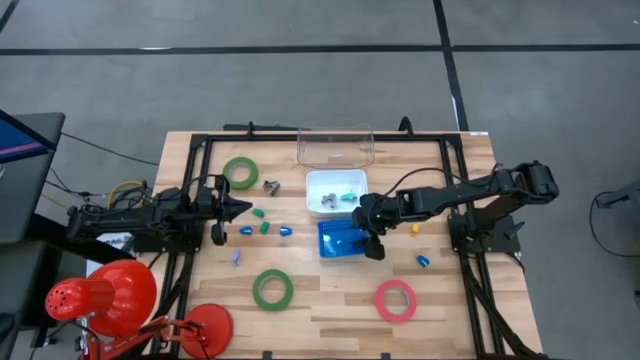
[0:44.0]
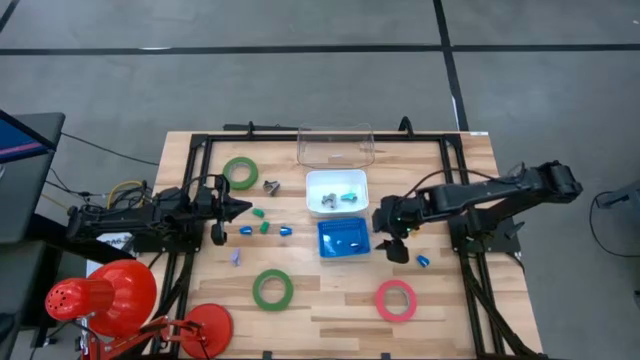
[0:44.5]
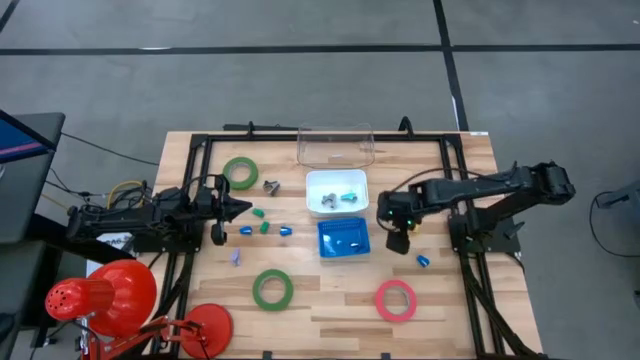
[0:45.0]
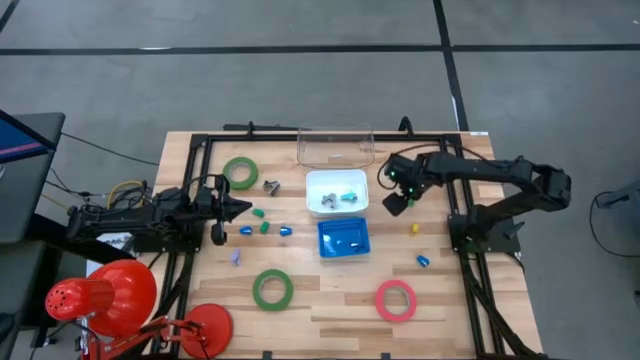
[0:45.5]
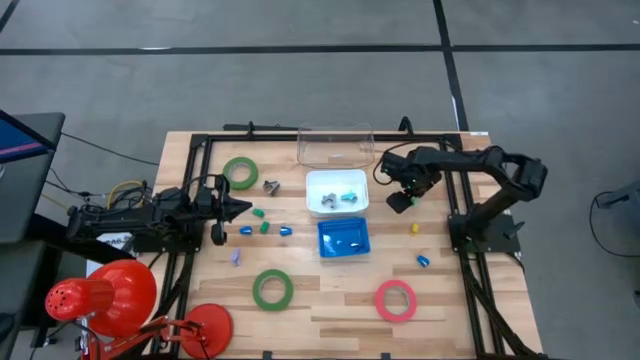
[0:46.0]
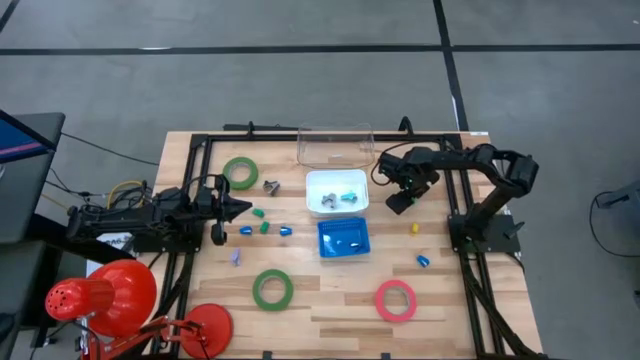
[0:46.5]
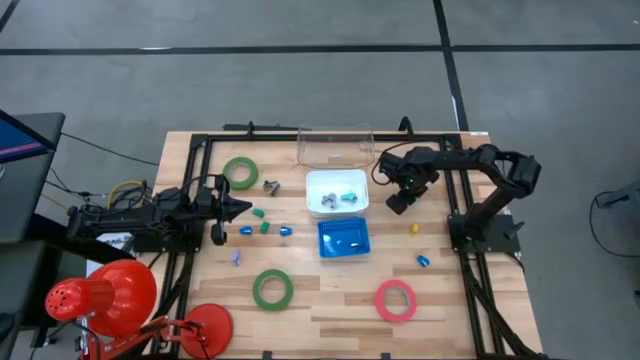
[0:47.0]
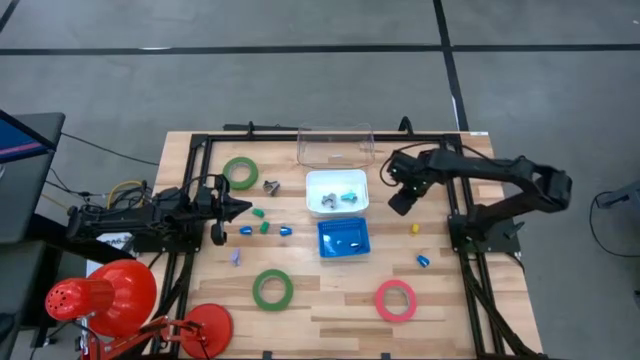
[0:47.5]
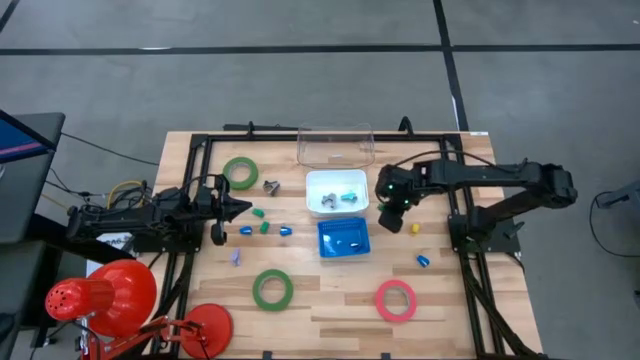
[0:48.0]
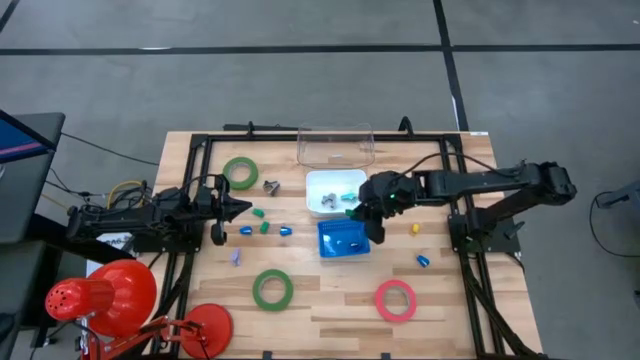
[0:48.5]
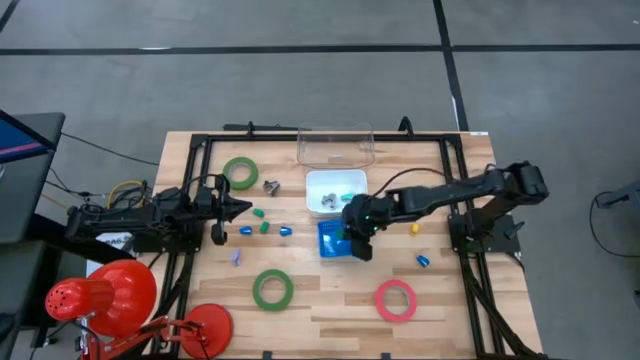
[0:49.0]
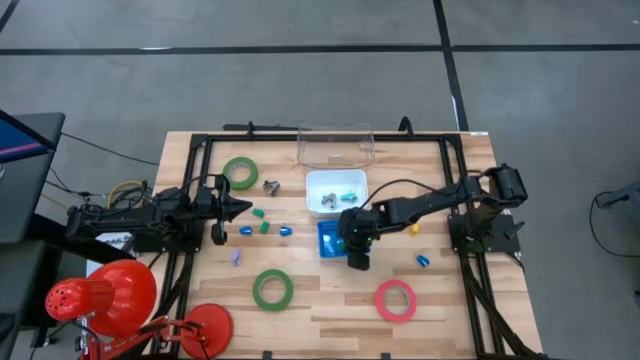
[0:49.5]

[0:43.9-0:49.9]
Task: Pick and place Stapler, Stapler remover, tape
Put the right green stapler into the blue bin

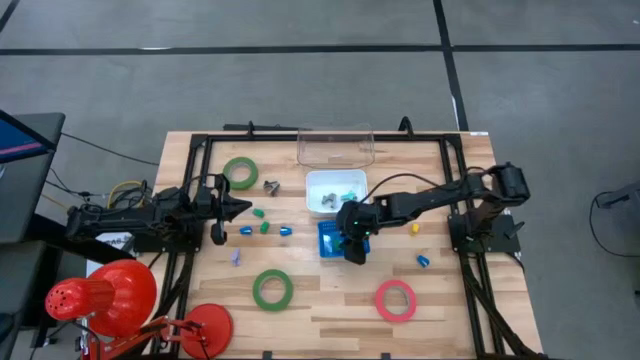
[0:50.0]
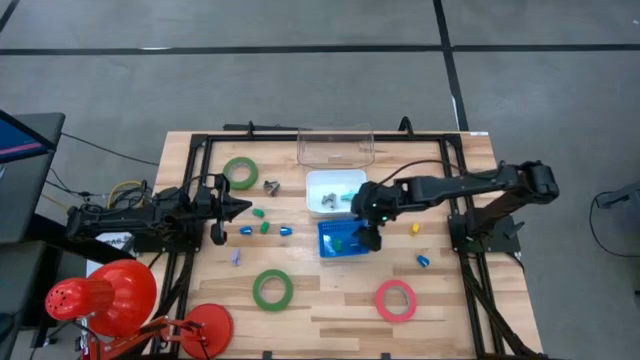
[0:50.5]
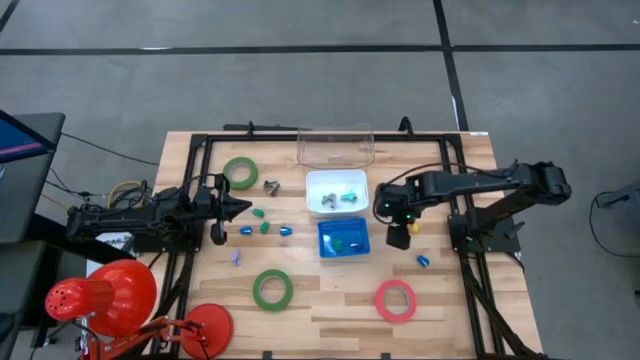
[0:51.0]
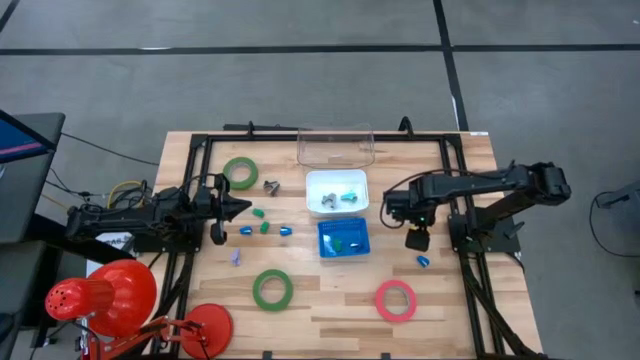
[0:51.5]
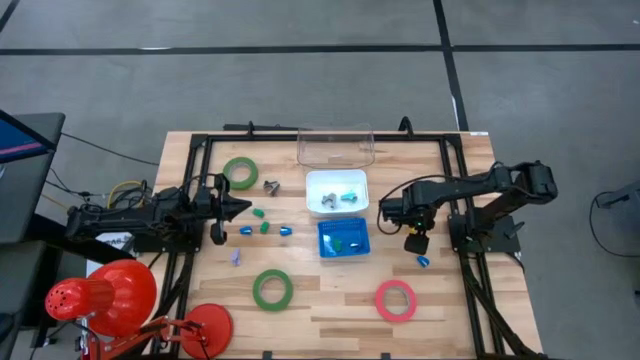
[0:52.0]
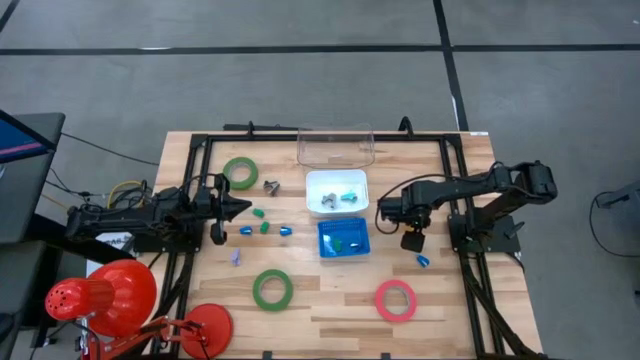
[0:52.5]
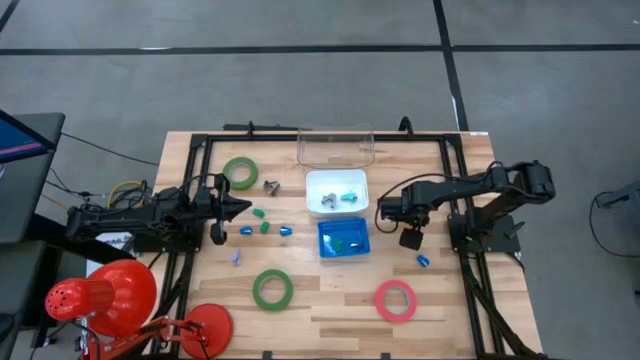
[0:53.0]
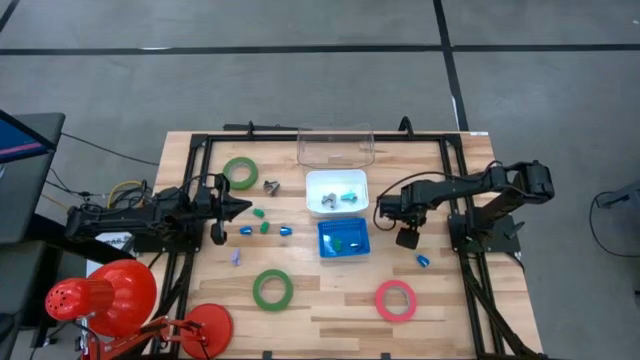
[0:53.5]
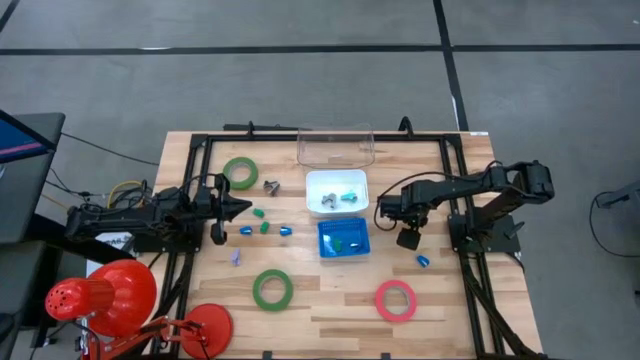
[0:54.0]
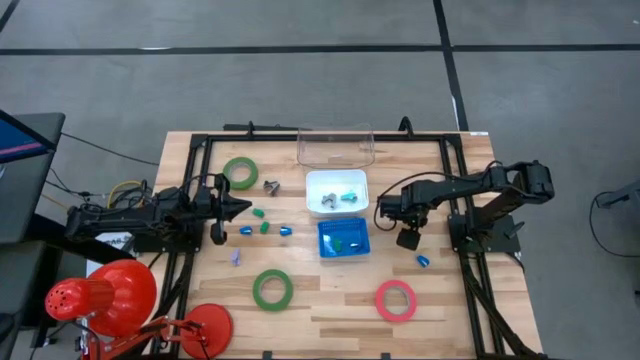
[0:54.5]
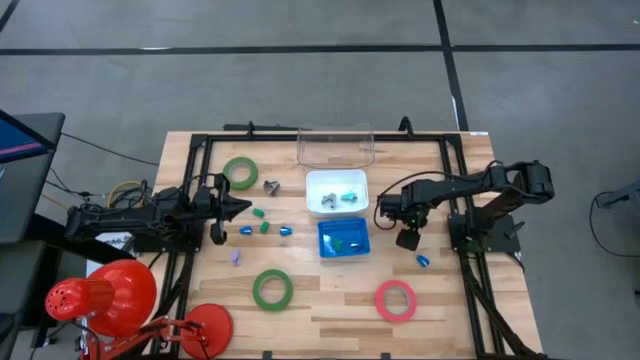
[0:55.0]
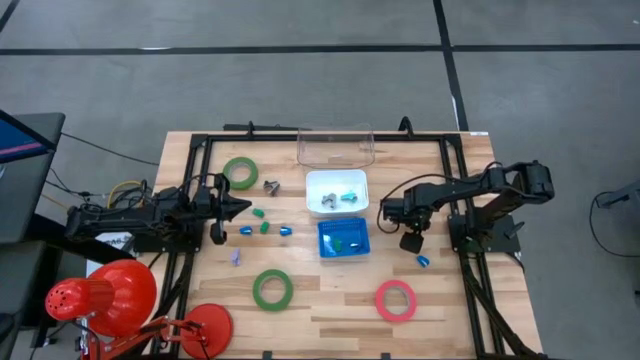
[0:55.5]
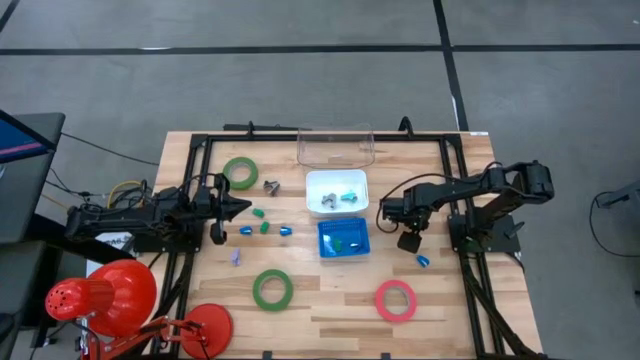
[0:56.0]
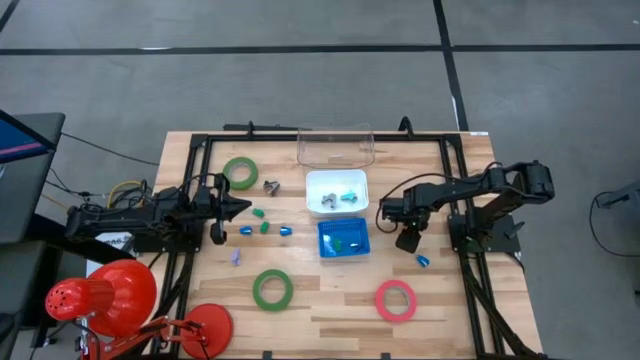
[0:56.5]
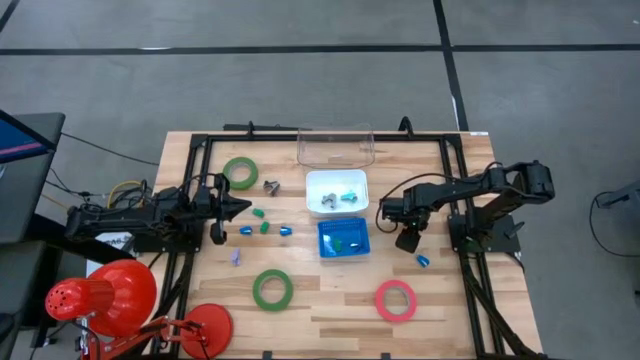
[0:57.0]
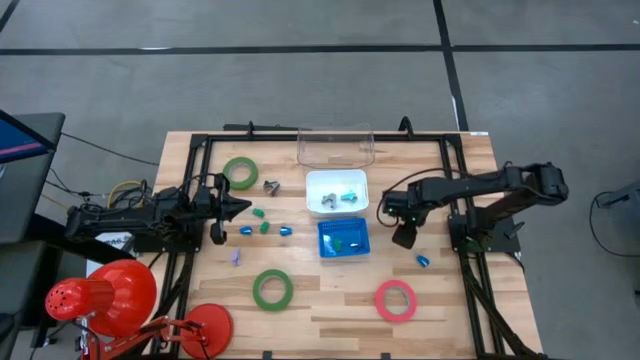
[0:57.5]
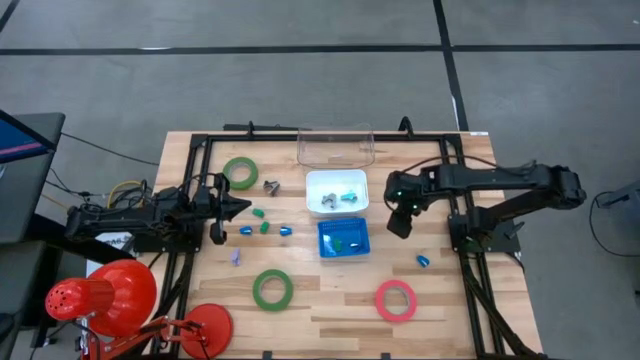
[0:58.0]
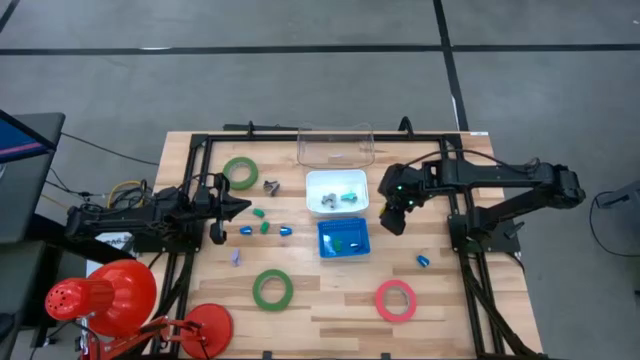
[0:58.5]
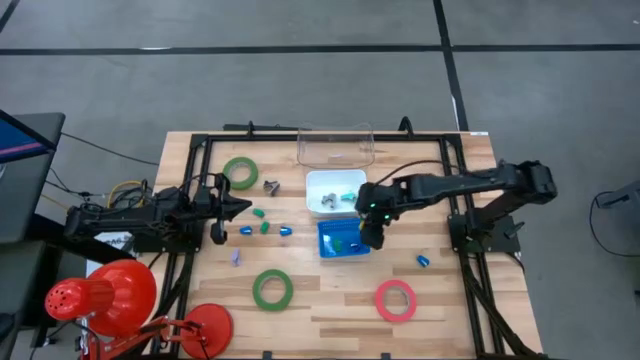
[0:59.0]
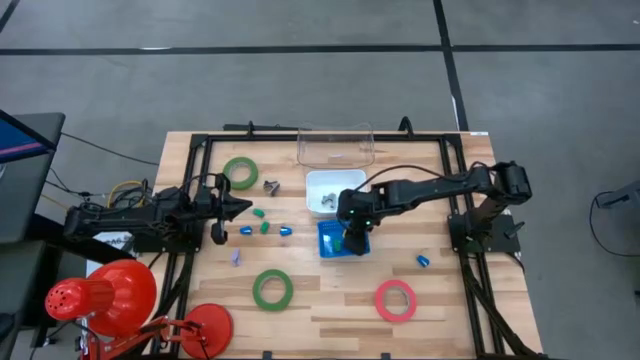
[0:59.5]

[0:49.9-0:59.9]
Put the yellow stapler into the blue bin

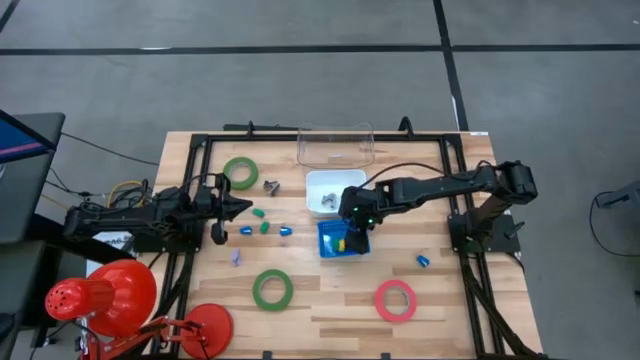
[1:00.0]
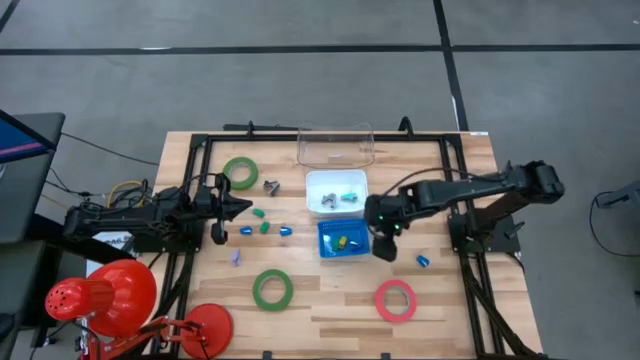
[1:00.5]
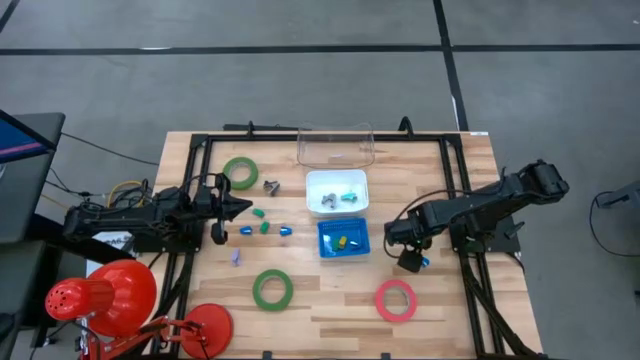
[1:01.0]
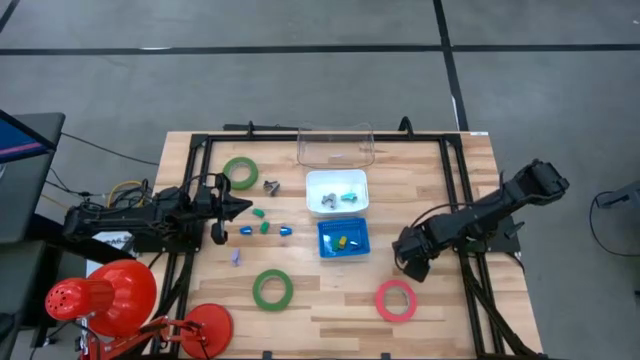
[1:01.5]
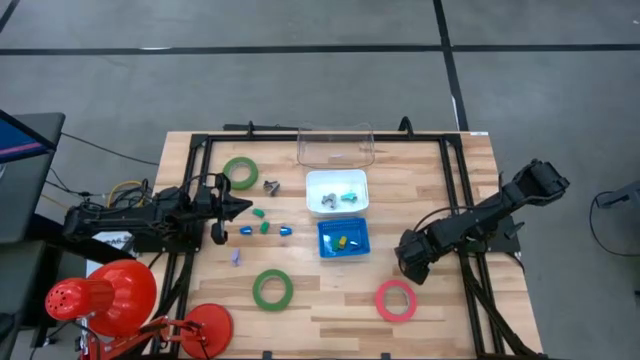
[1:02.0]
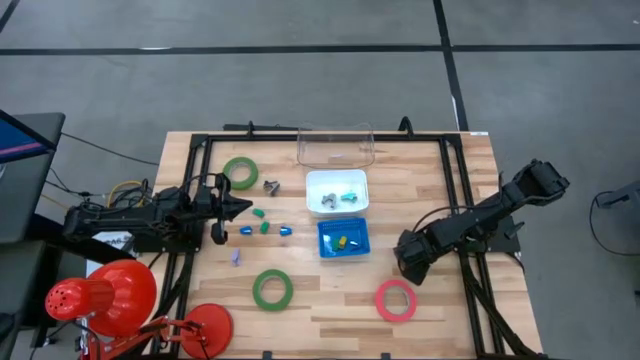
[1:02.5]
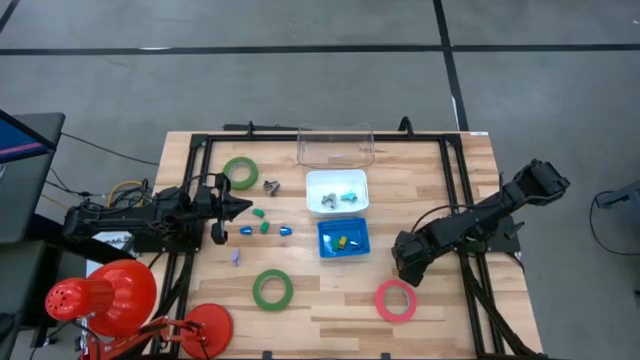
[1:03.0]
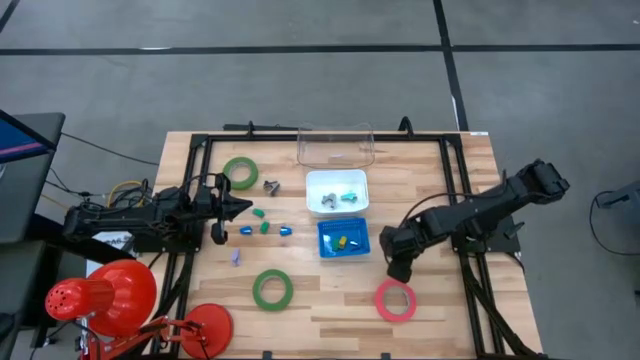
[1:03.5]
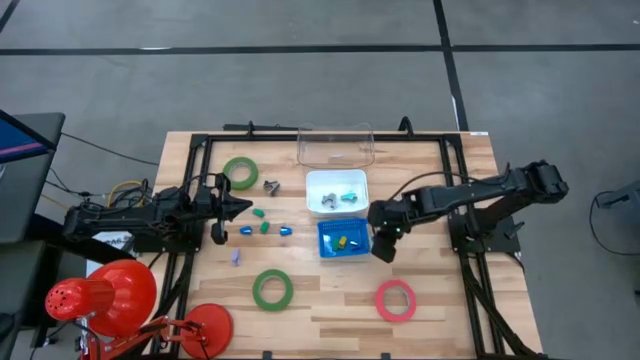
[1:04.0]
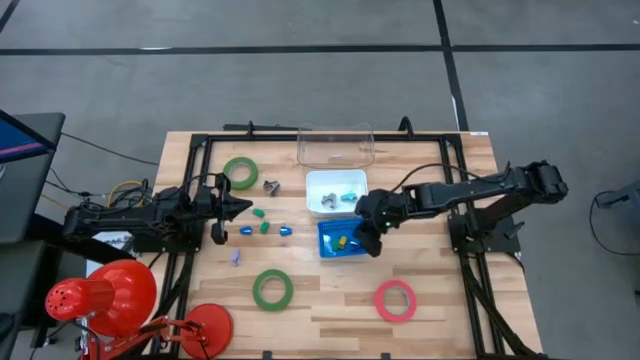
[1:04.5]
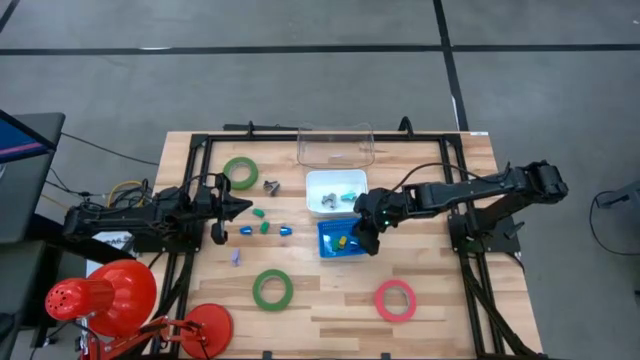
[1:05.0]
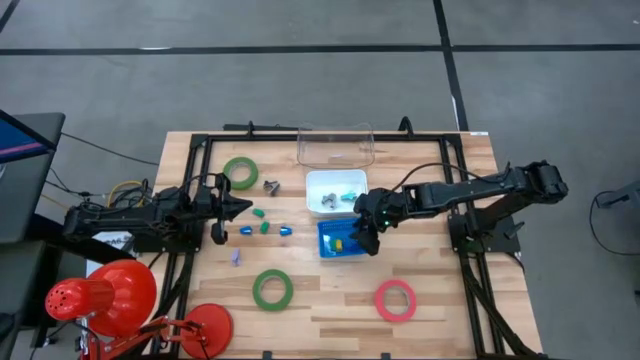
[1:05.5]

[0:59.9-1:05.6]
Put the right blue stapler into the blue bin

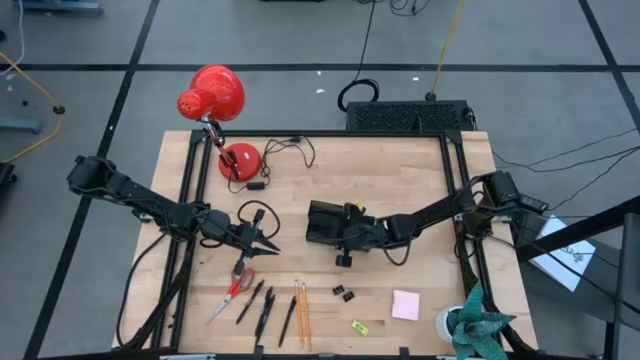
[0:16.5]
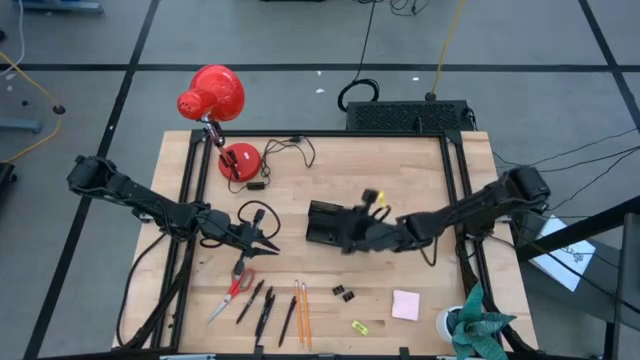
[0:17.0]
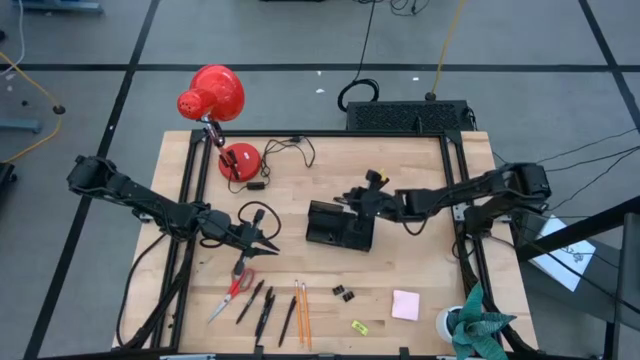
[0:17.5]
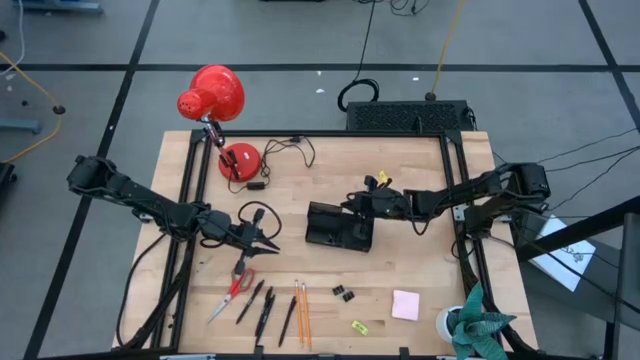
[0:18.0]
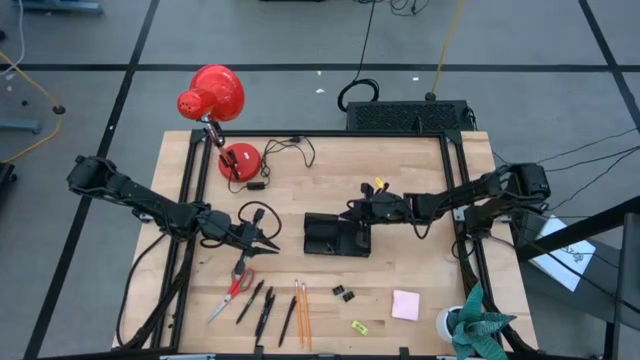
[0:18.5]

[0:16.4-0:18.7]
Task: Pick and place office supplies into organizer
Adjust the black desk organizer
